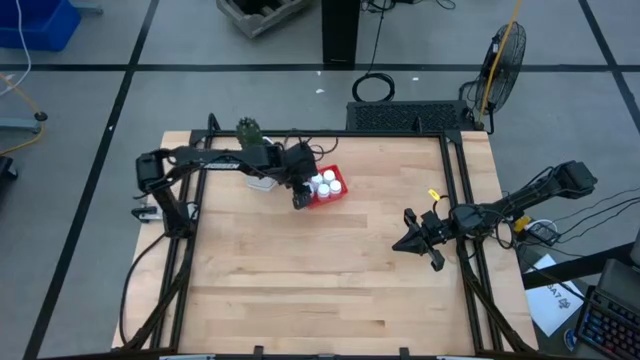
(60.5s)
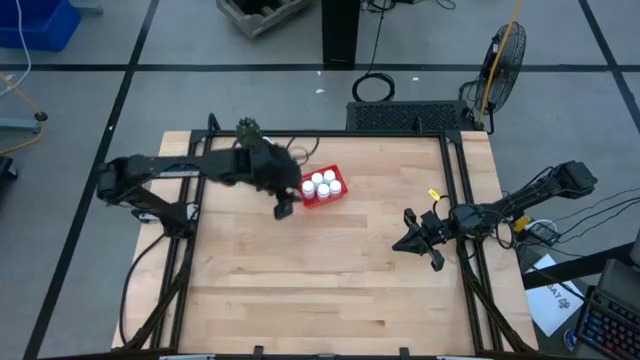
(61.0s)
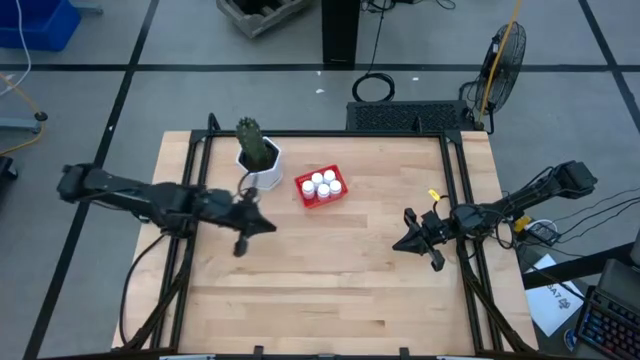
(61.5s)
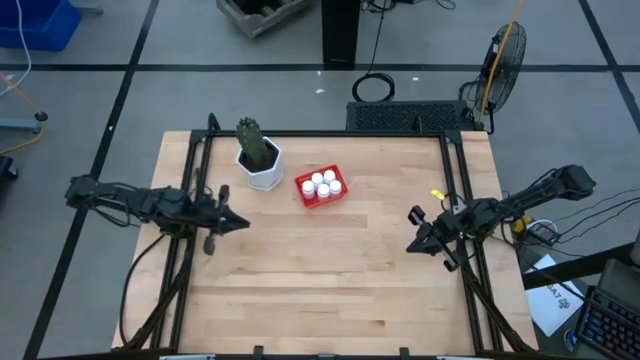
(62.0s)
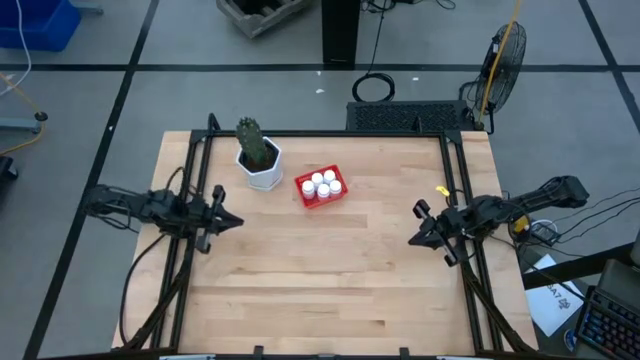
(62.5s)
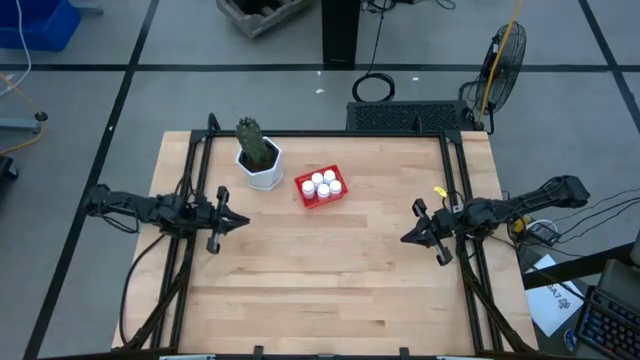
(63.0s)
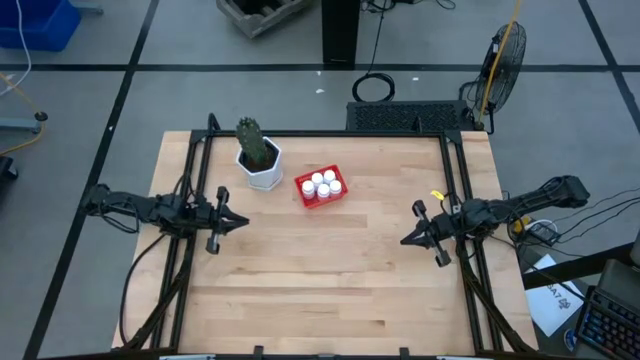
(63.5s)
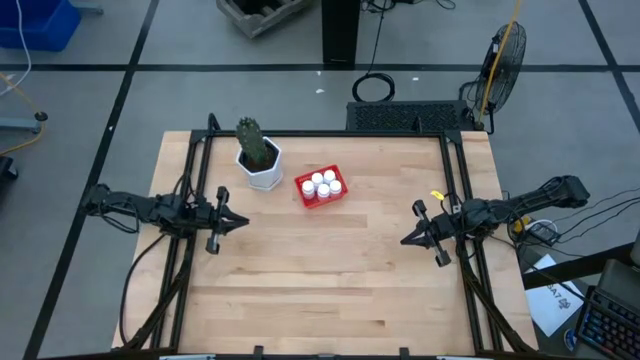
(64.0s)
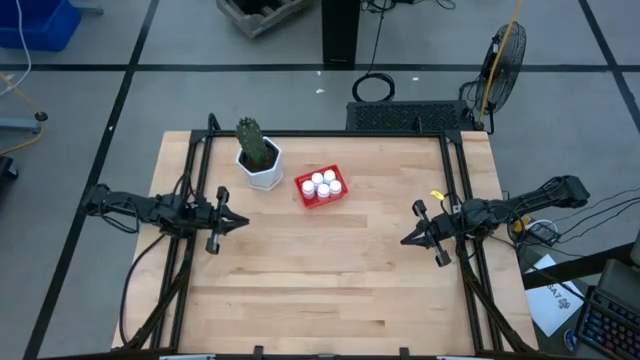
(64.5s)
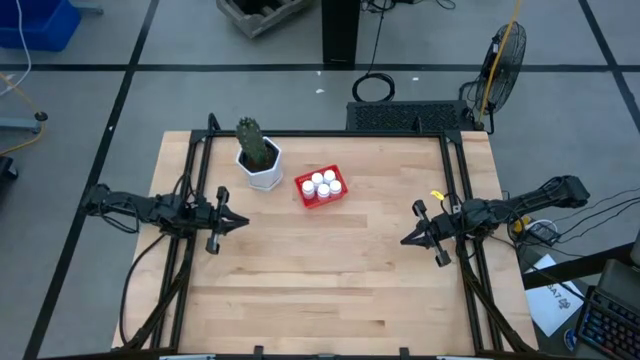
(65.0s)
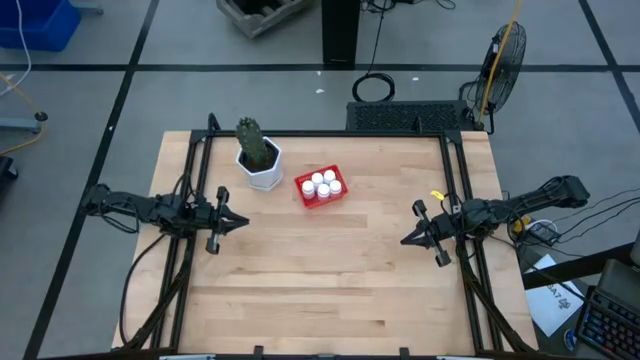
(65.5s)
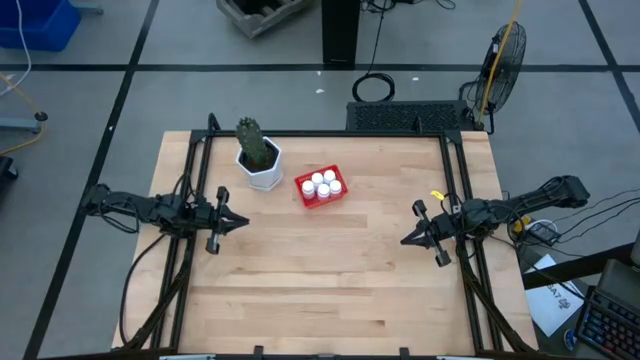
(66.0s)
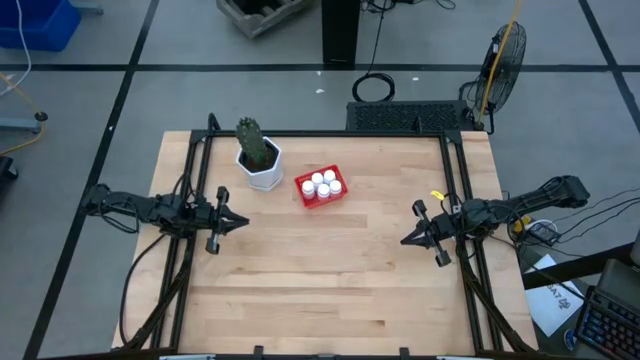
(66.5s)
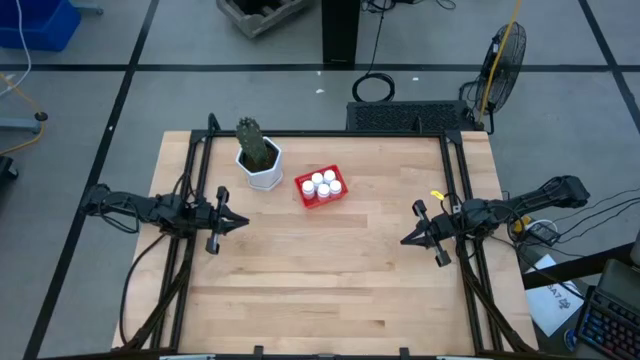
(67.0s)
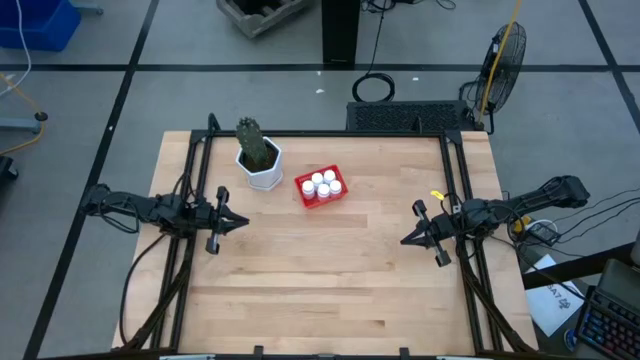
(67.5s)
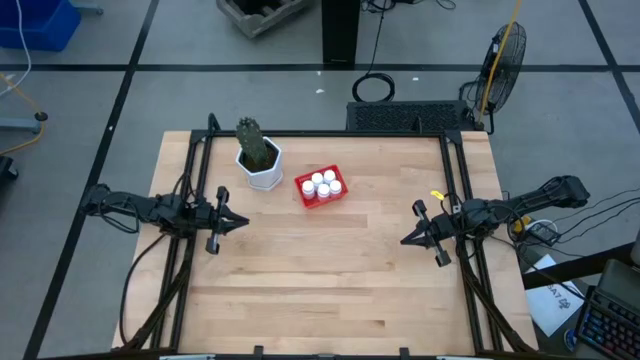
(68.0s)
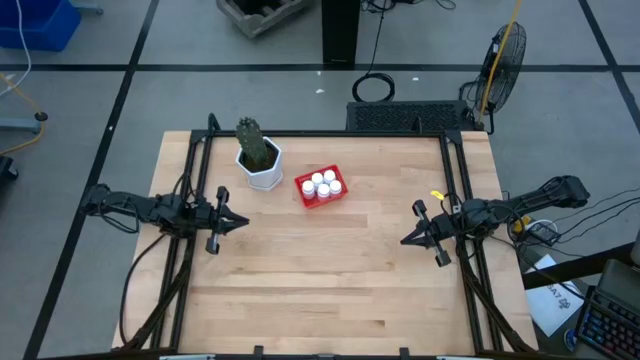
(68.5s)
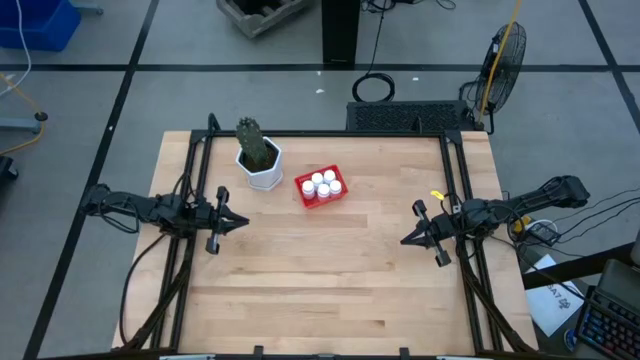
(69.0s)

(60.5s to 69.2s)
Task: Pick and place pill bottles into a basket
Return to Home Position

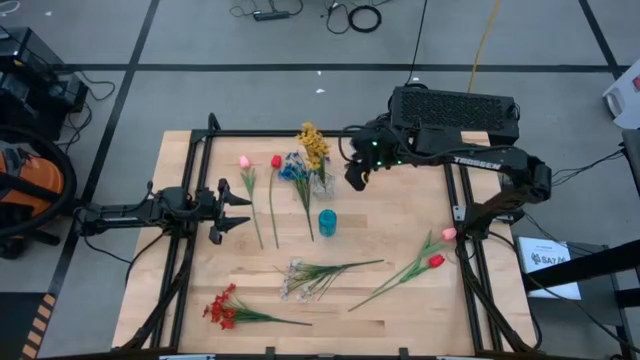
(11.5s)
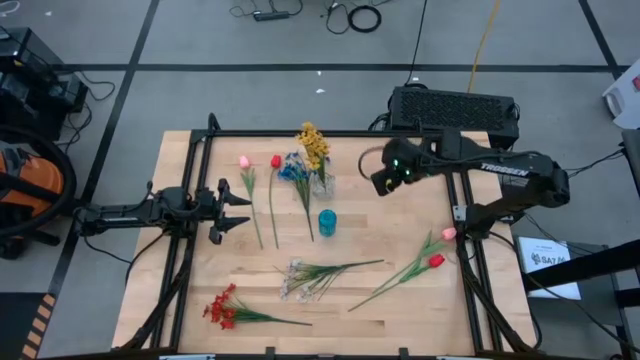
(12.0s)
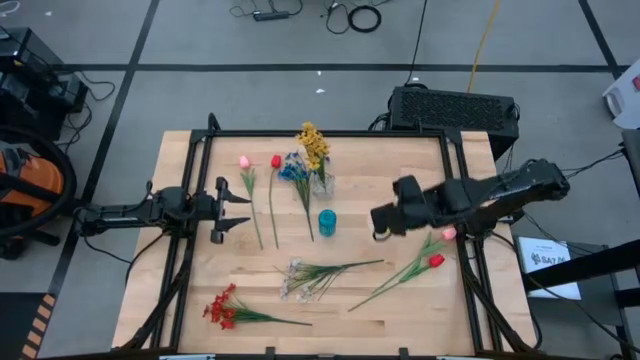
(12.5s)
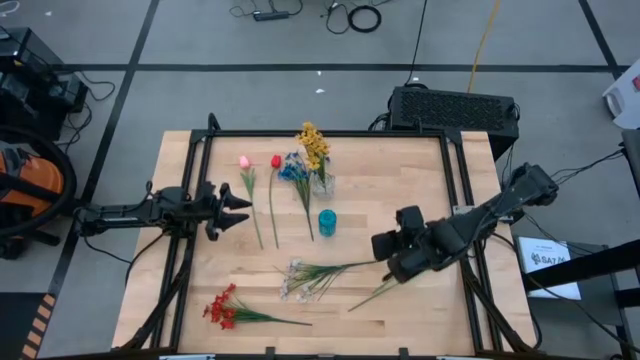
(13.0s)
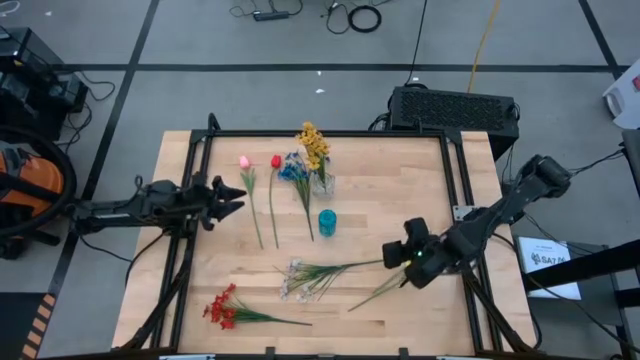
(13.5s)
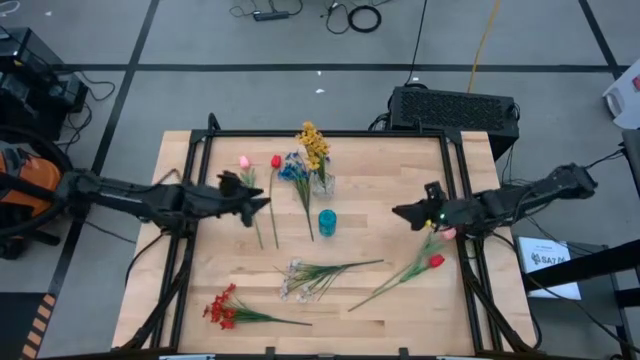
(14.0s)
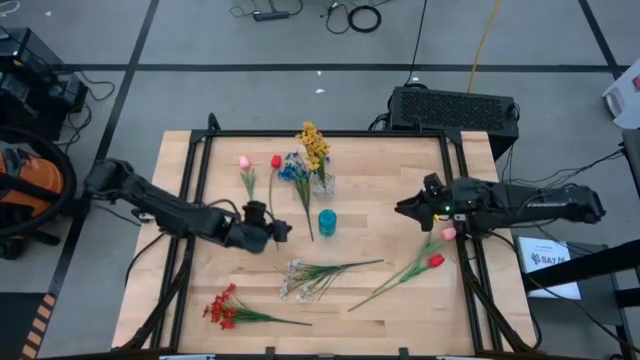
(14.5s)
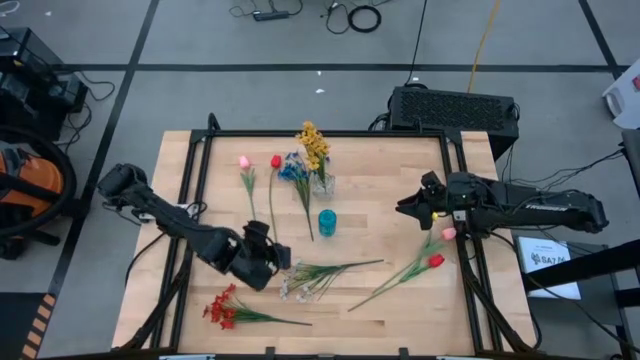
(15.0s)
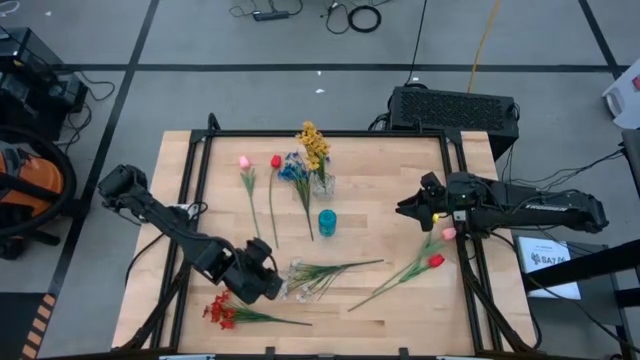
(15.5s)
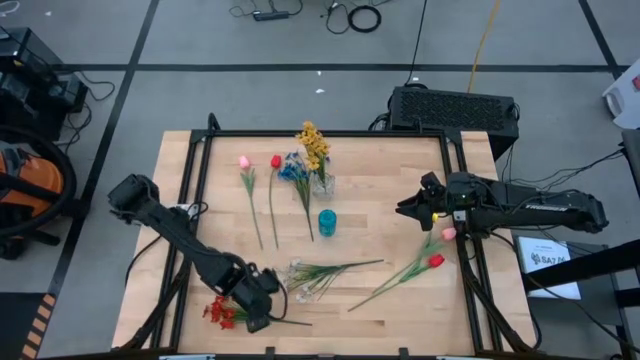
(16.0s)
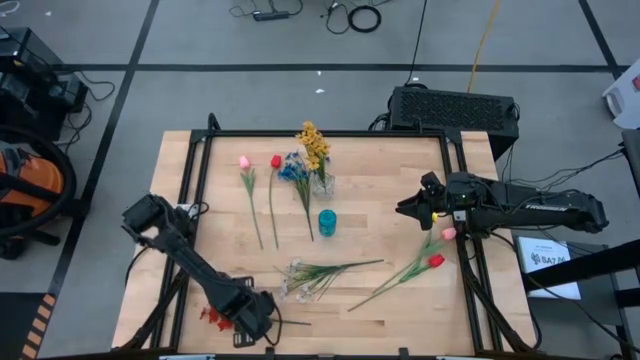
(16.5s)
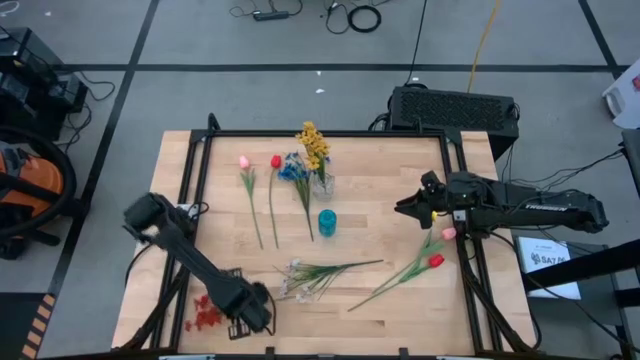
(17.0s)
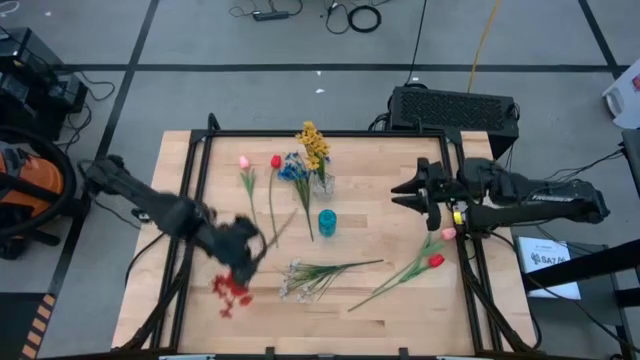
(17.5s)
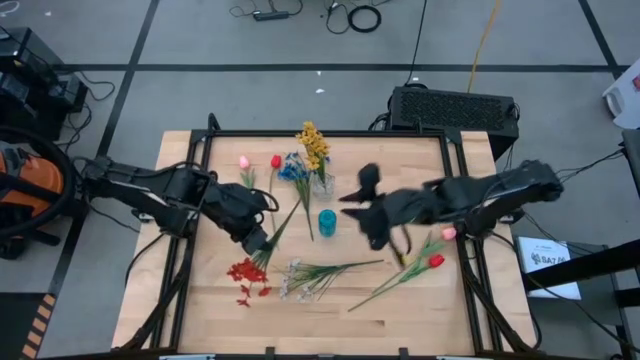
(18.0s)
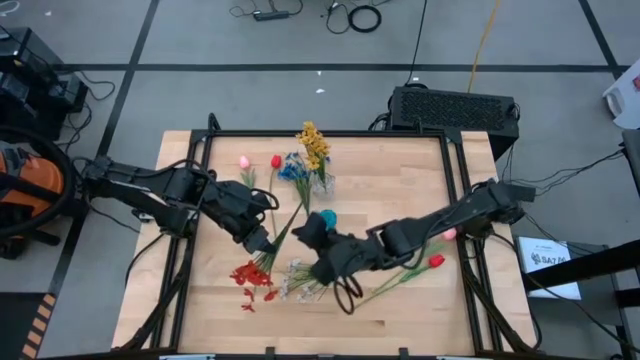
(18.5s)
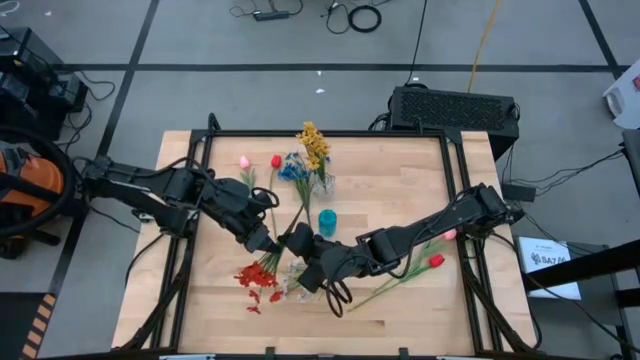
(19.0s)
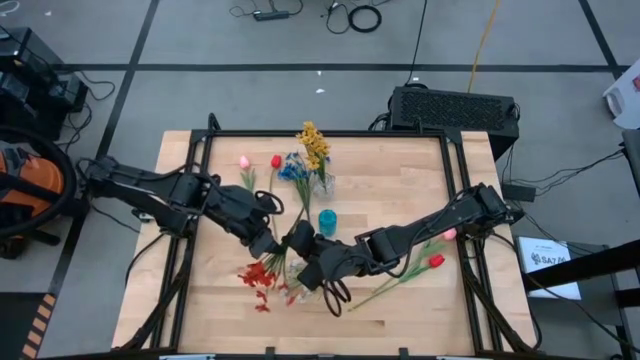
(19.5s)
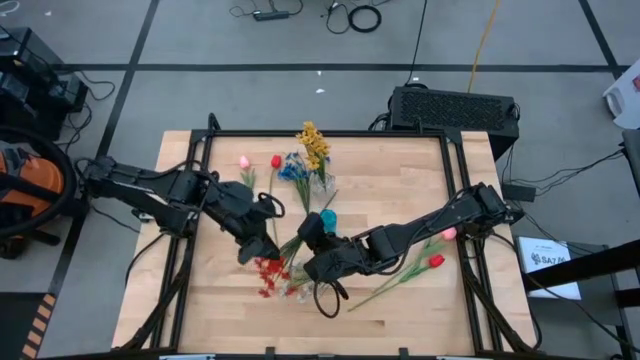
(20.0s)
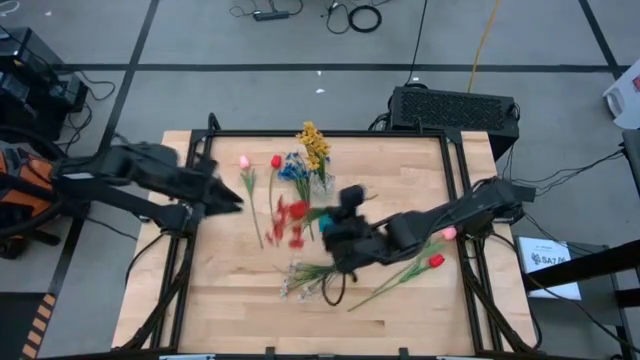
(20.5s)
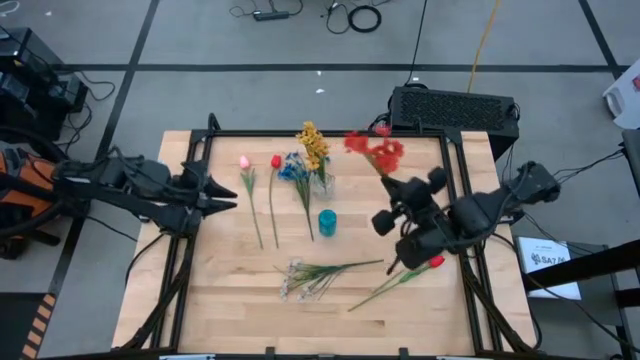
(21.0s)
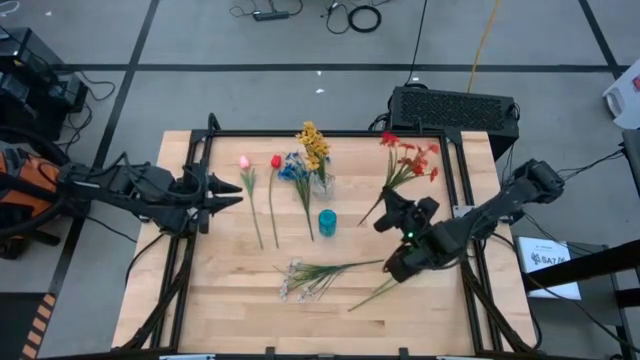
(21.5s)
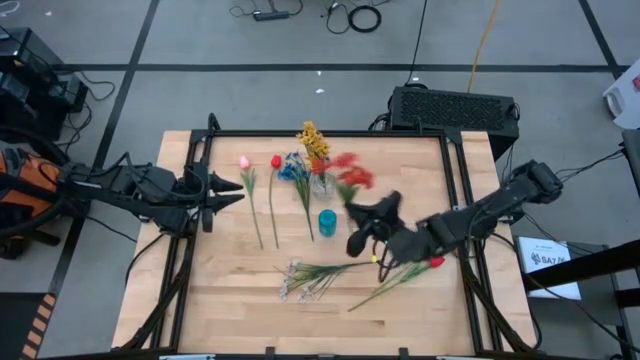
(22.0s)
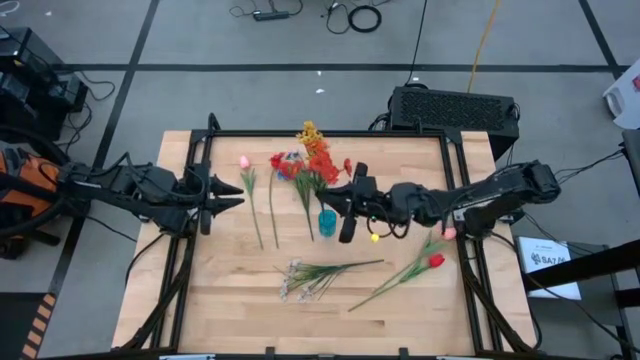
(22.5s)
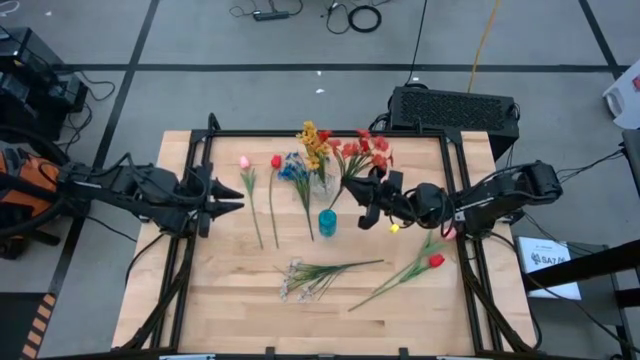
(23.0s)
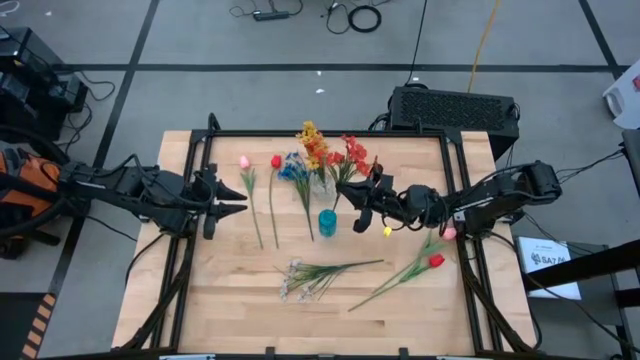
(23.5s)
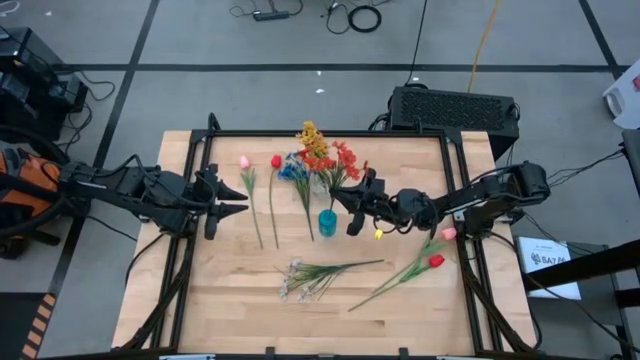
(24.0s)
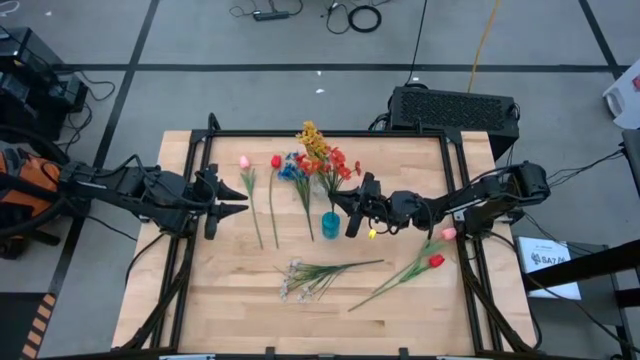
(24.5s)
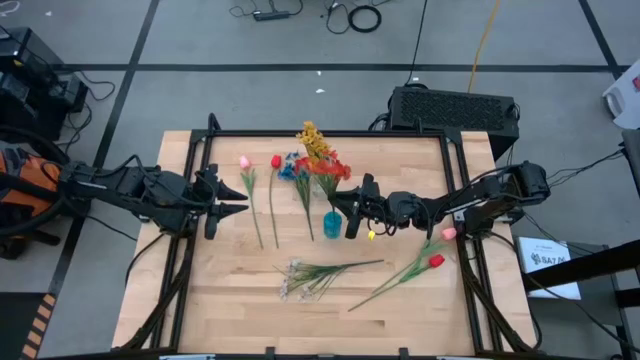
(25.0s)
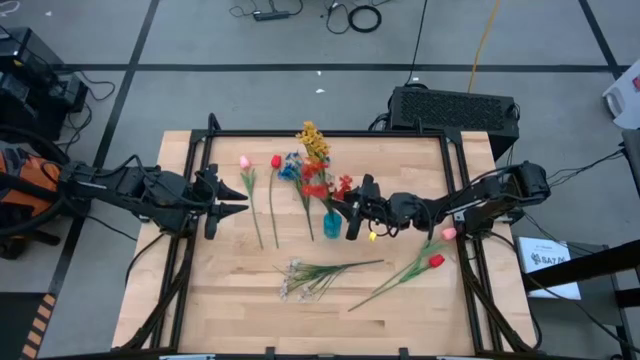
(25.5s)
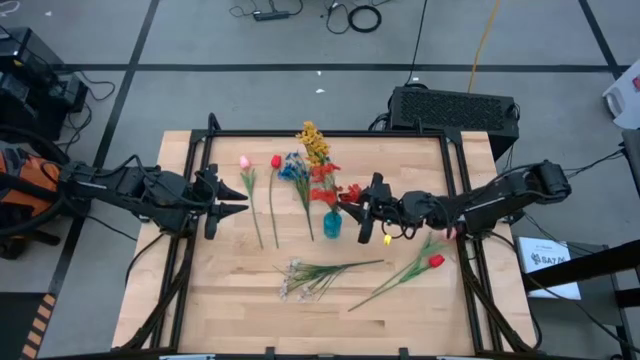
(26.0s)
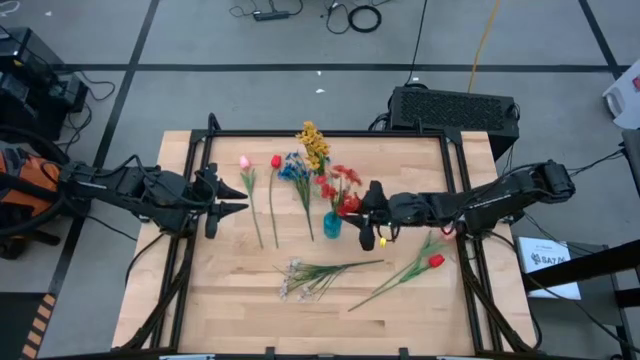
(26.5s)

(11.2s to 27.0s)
Task: Sort flowers into vase by color
Put the red flowers into the blue vase
